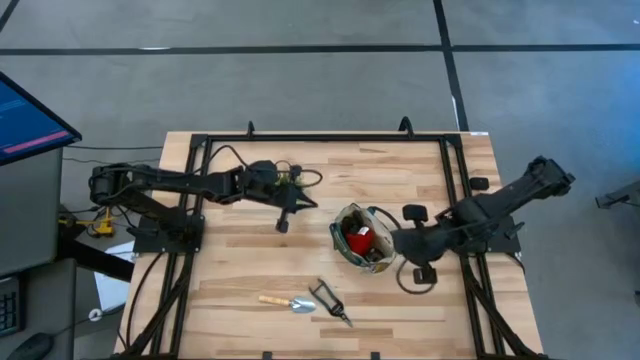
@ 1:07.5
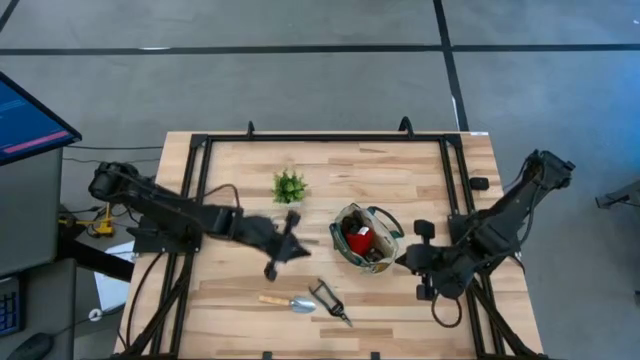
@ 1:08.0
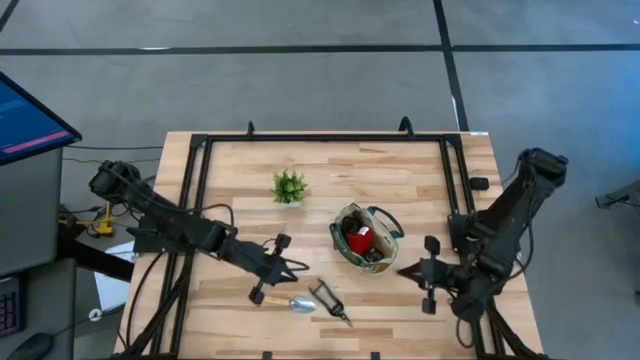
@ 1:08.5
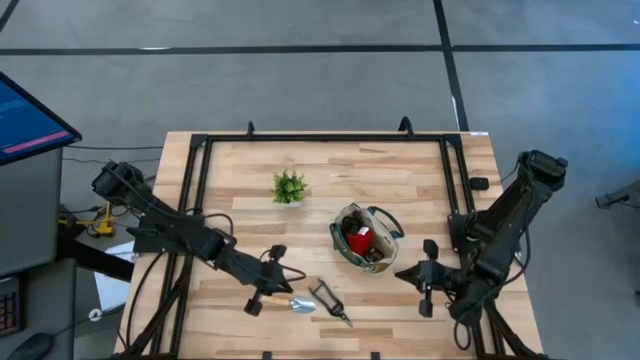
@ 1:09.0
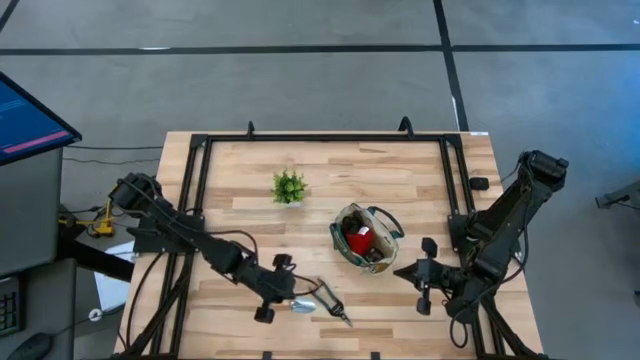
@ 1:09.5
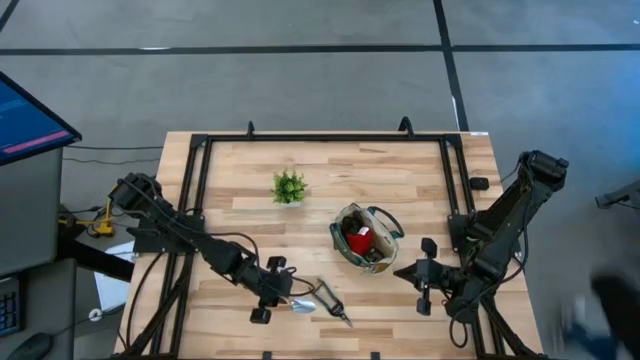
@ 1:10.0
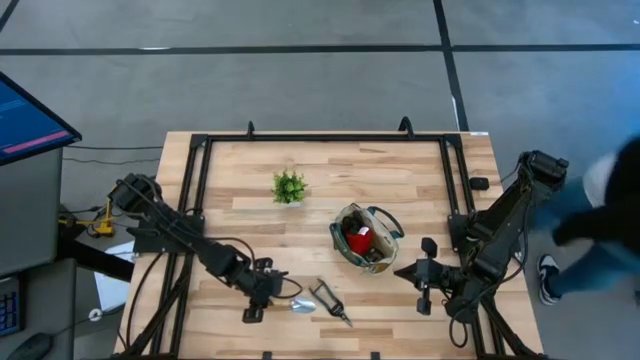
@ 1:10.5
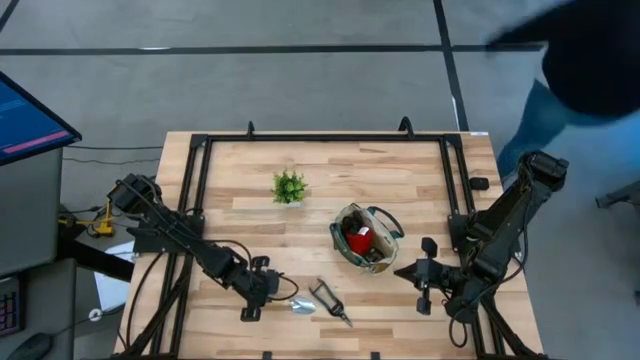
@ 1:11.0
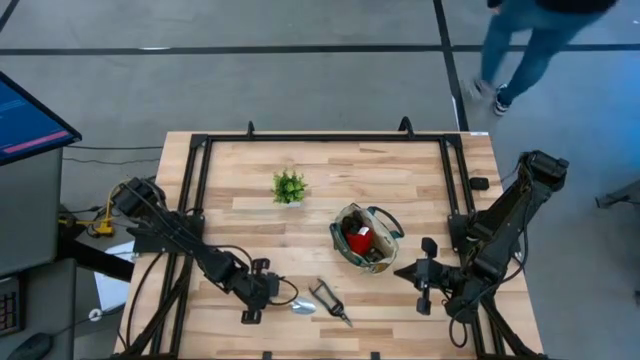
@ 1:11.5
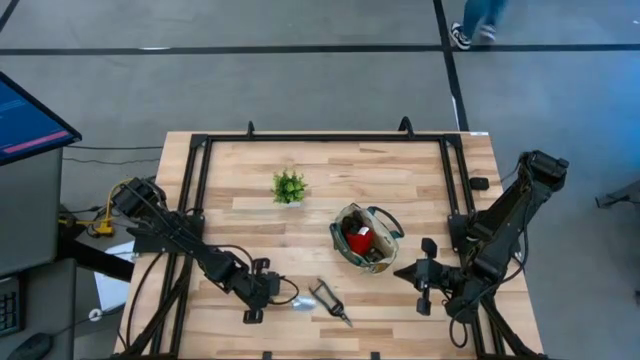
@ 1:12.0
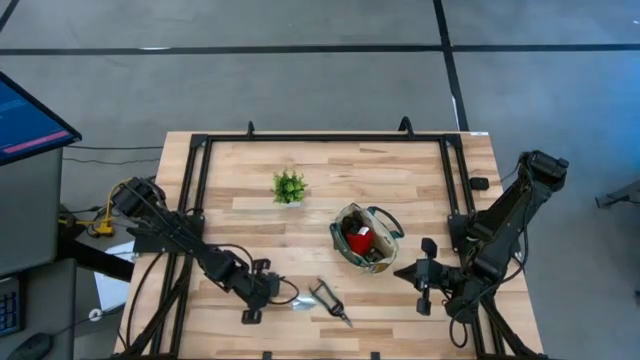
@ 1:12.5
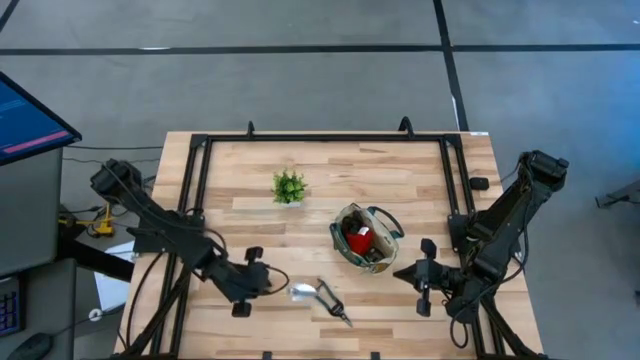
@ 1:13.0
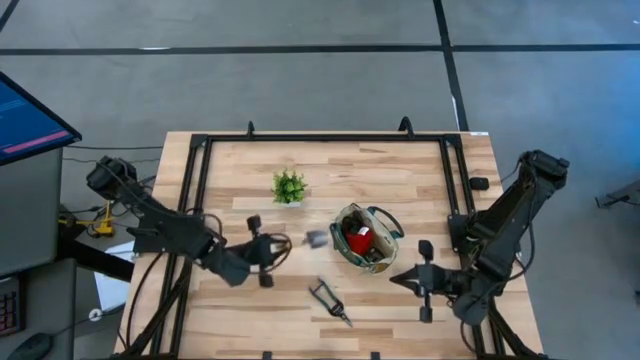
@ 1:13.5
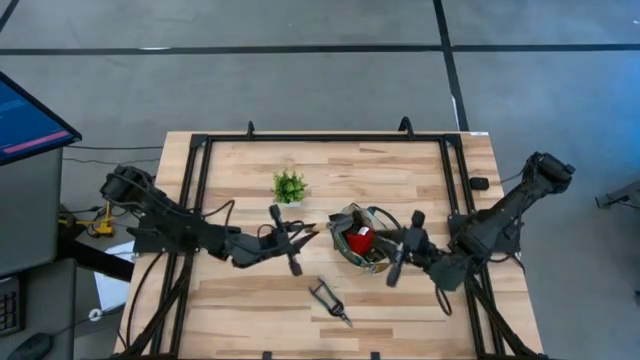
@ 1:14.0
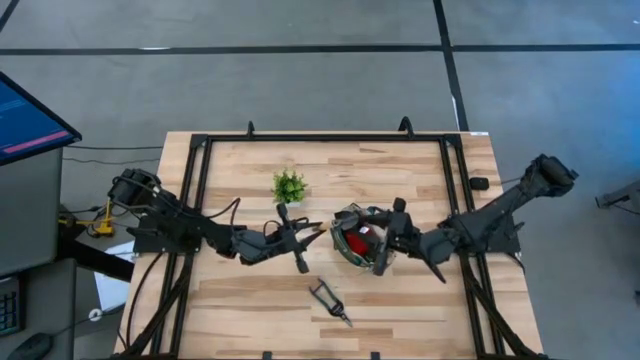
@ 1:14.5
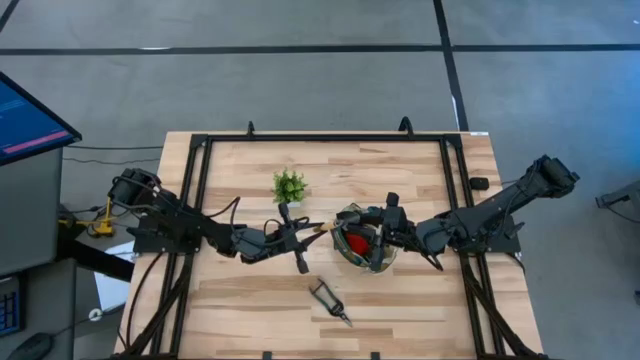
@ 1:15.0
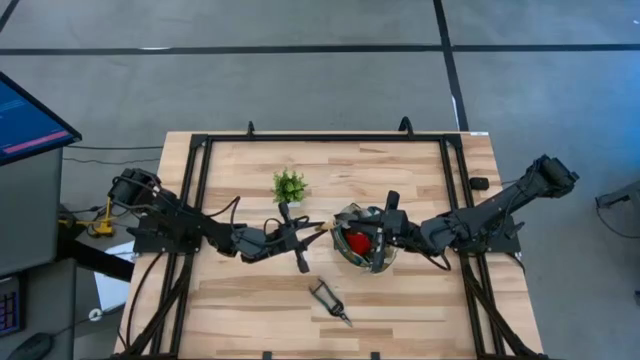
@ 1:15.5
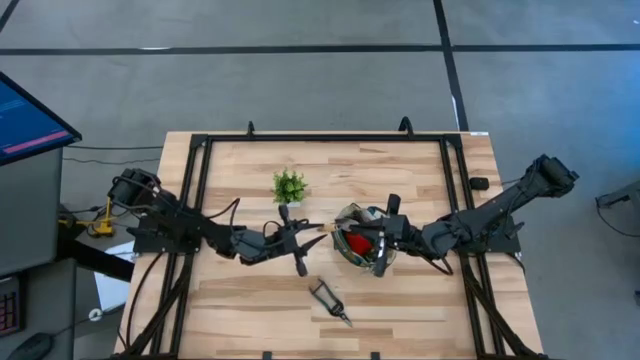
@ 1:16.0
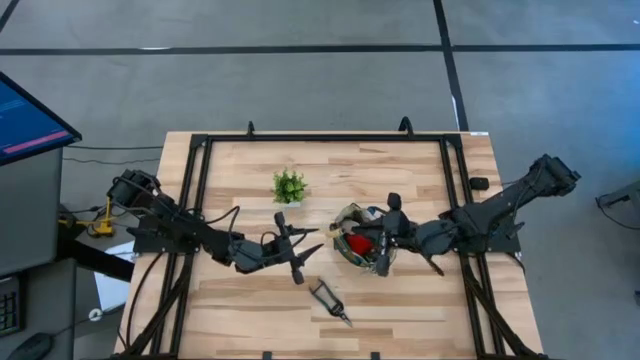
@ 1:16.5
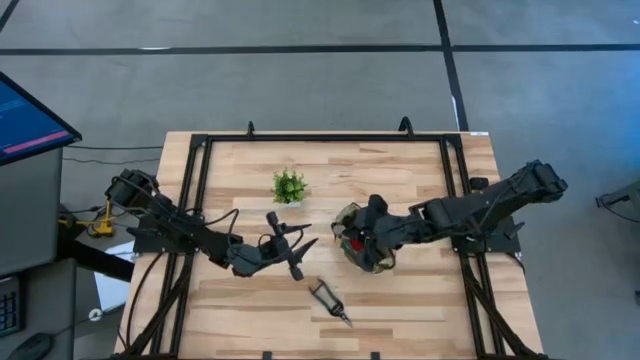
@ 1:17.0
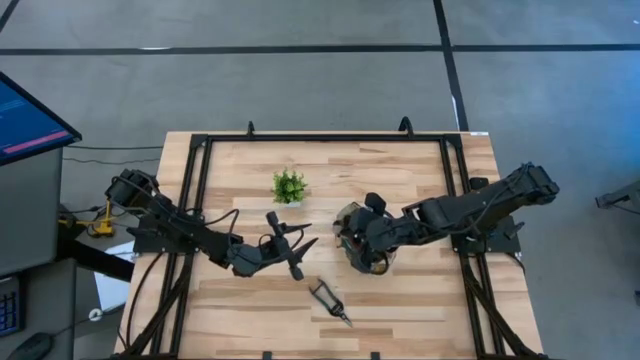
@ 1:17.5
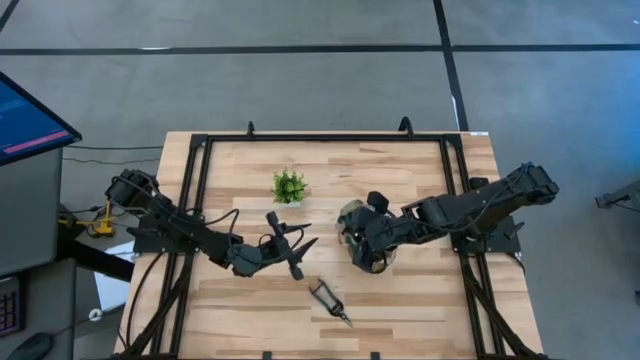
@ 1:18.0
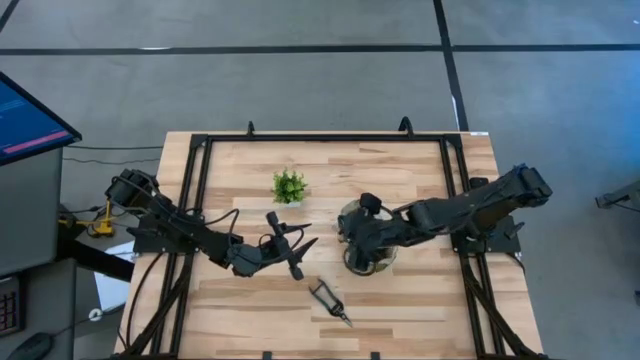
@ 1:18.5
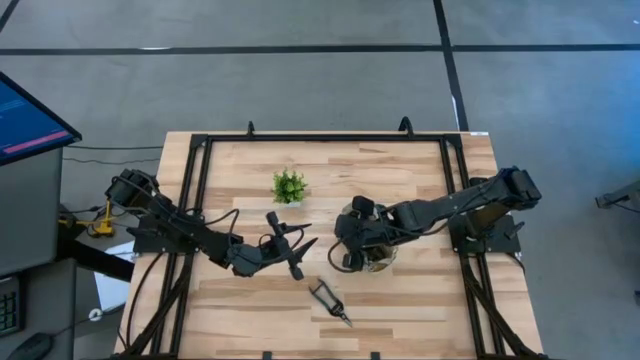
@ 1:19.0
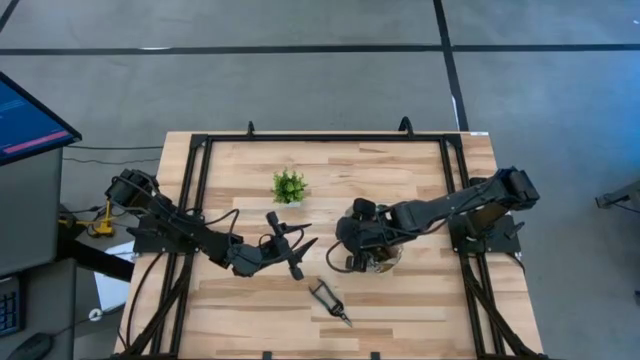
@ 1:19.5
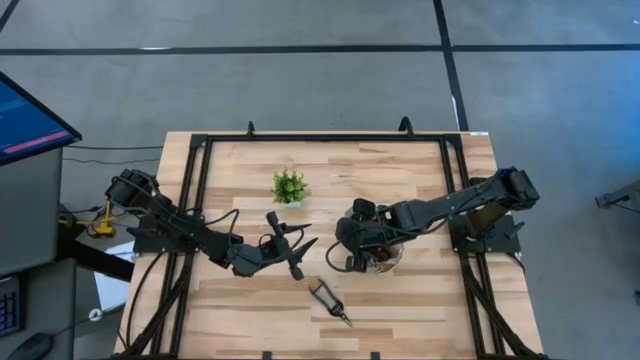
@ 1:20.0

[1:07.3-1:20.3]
Task: Pick & Place Garden tools in Gardening bag
Put the brown trowel into the white gardening bag

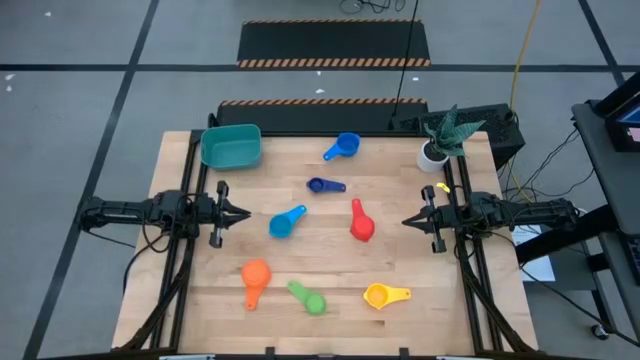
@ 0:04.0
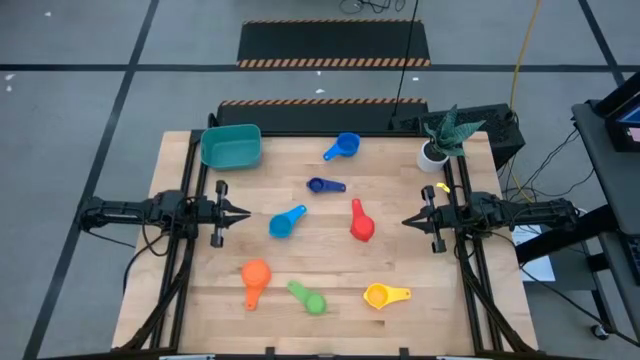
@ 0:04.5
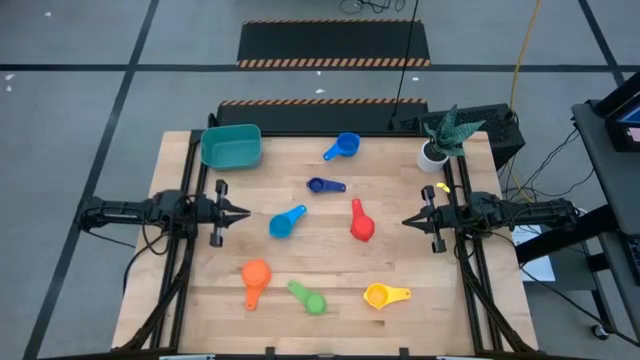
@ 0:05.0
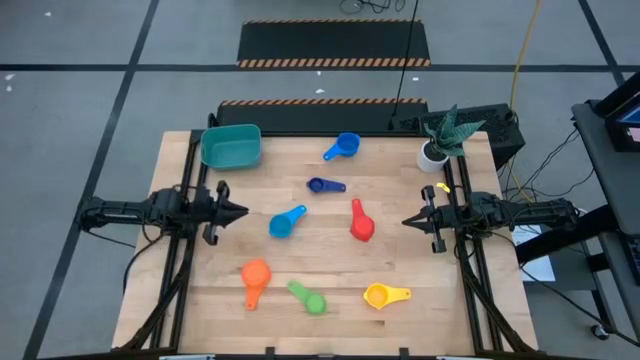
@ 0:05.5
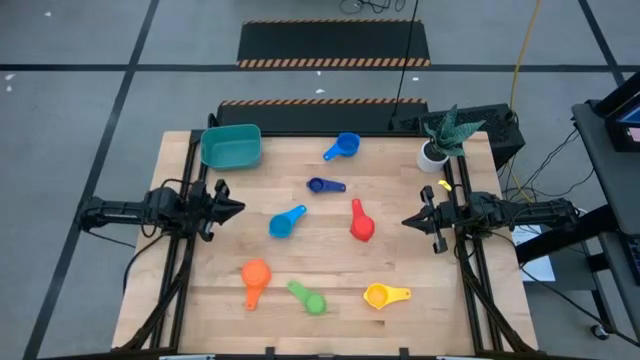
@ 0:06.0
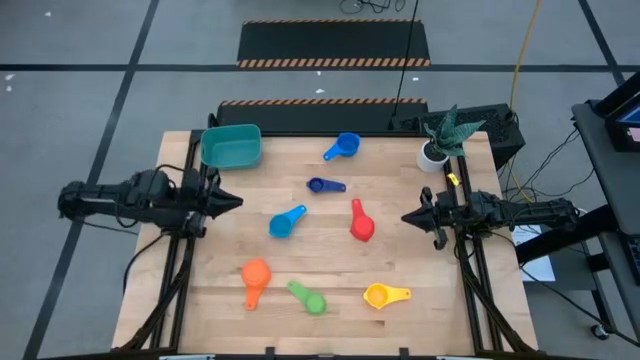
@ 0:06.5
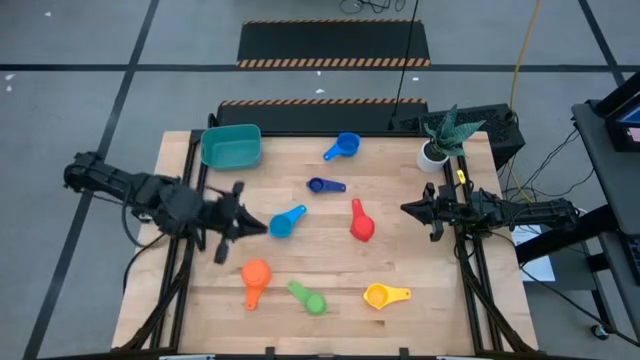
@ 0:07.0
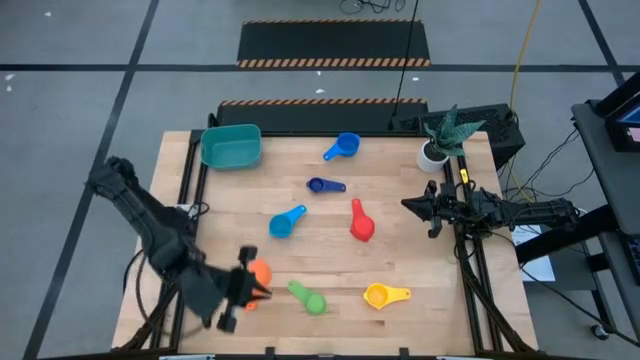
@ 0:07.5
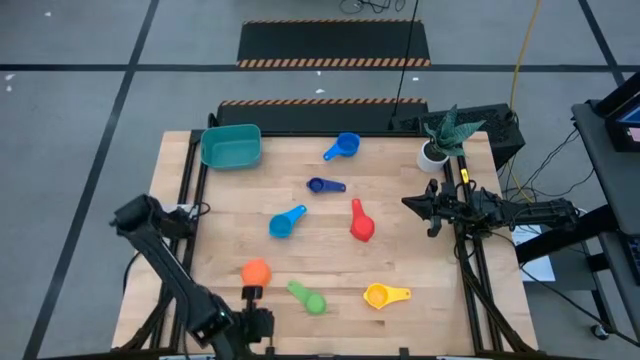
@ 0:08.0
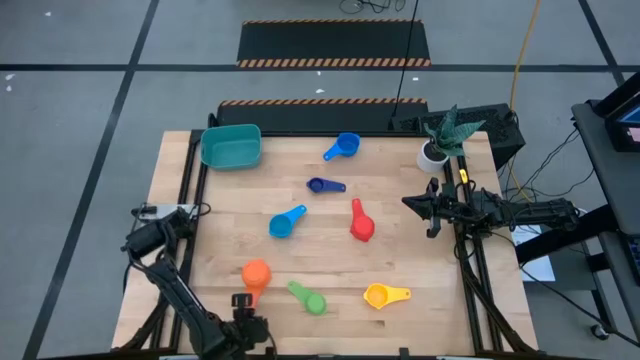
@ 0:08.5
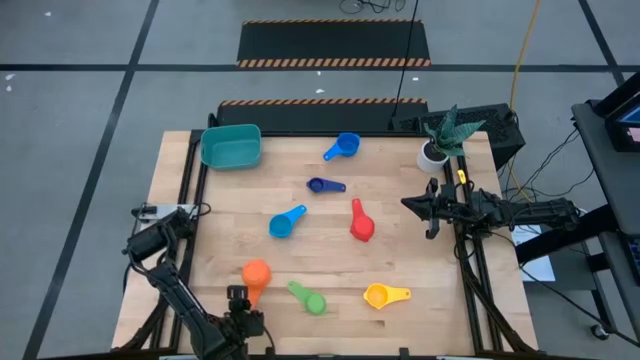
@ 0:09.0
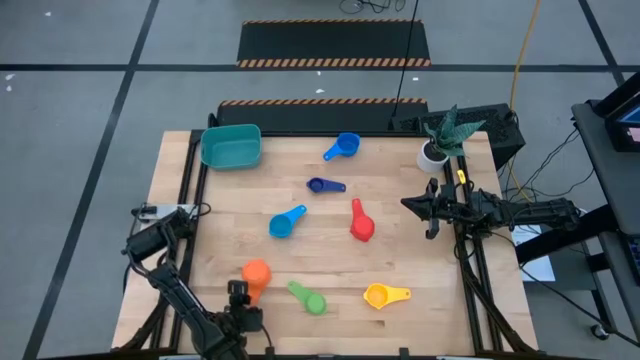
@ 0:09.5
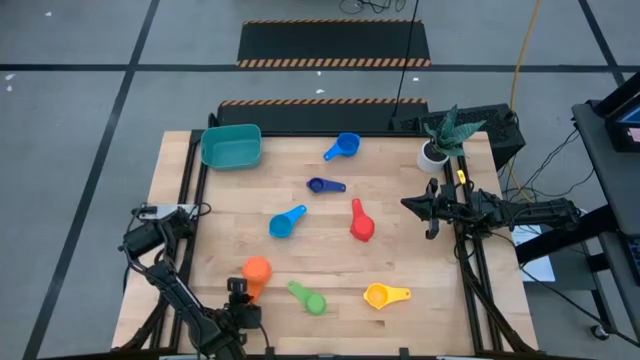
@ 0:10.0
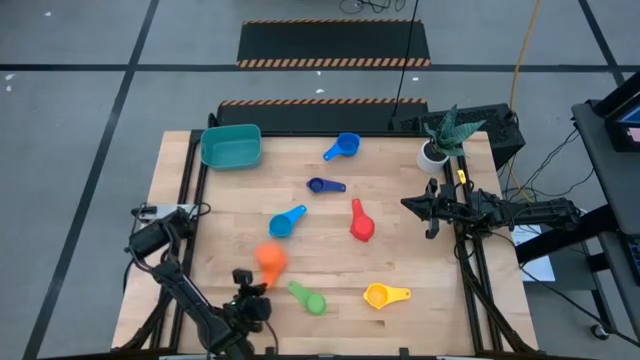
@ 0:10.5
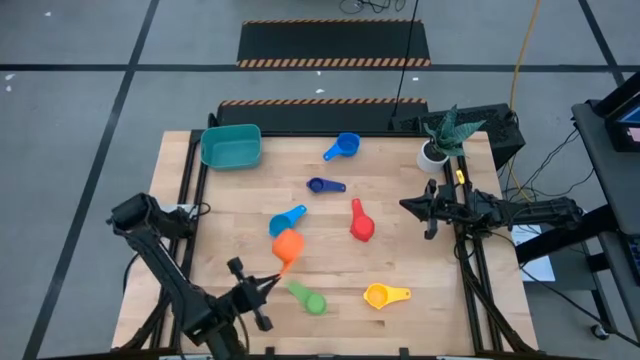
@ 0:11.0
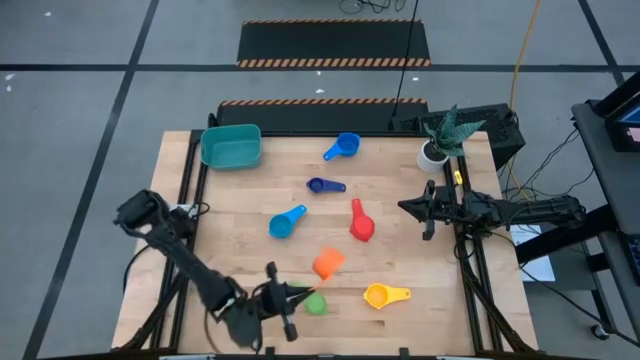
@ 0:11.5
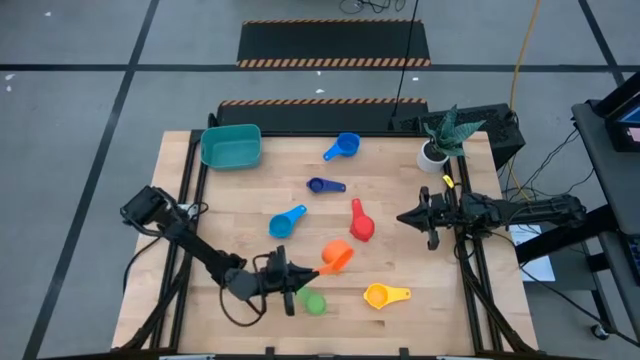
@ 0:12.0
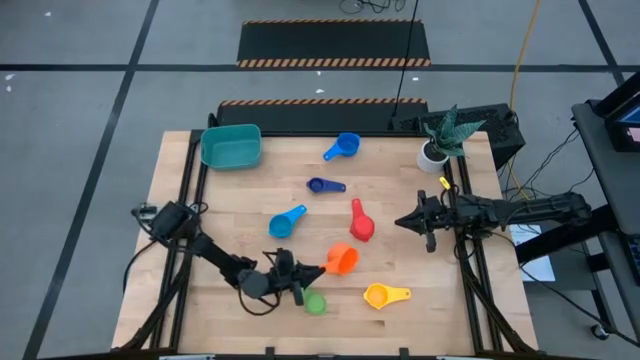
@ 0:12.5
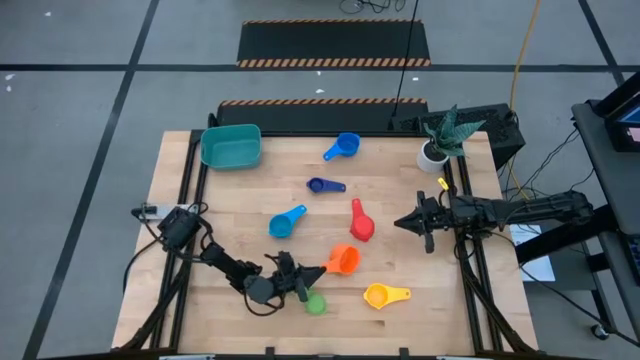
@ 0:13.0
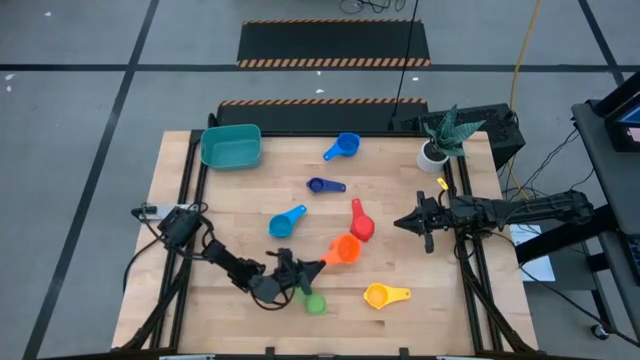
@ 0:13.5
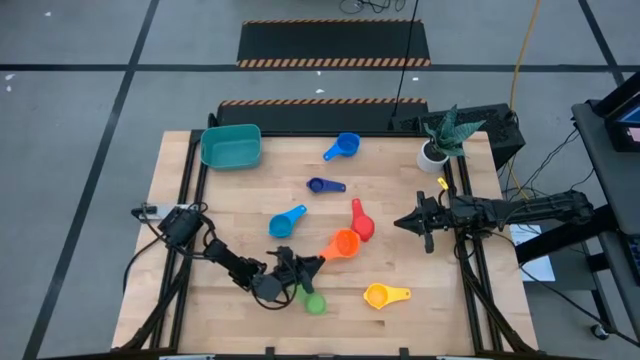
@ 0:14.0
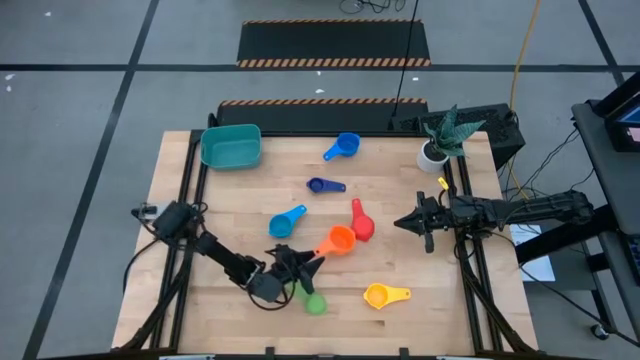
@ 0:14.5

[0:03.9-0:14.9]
Task: Nest measuring cups in basket
Move the orange measuring cup to the center of the table
